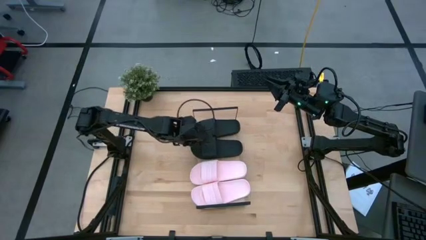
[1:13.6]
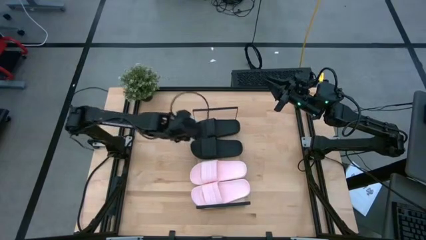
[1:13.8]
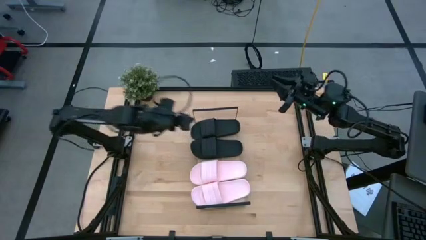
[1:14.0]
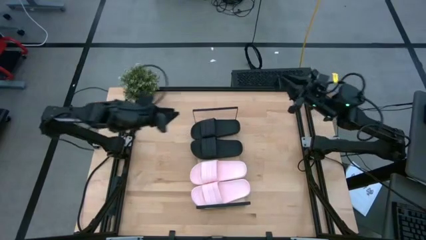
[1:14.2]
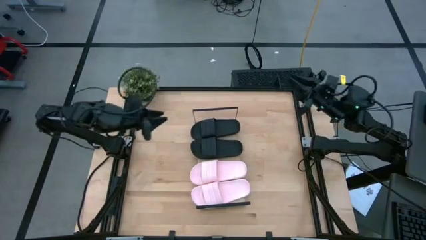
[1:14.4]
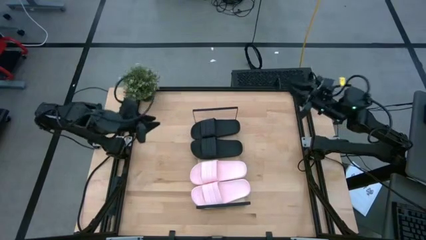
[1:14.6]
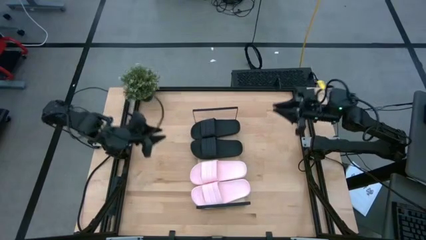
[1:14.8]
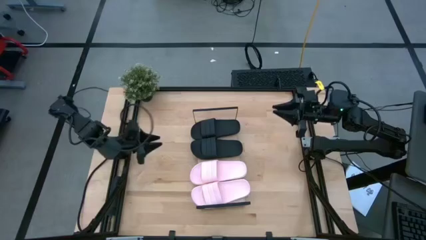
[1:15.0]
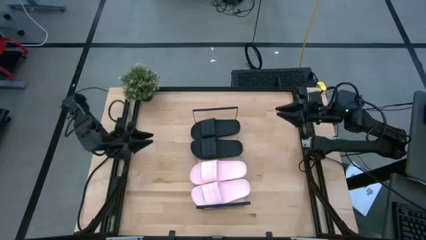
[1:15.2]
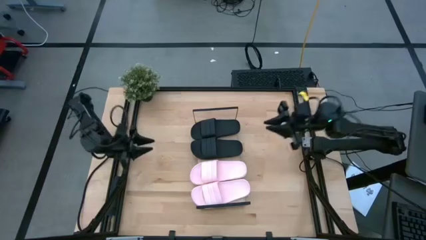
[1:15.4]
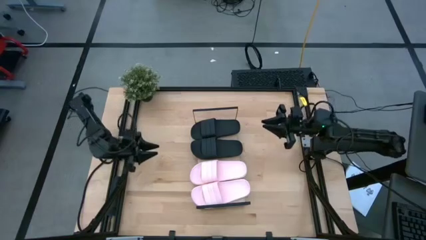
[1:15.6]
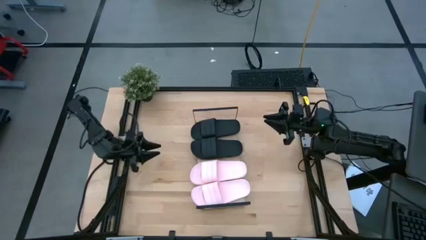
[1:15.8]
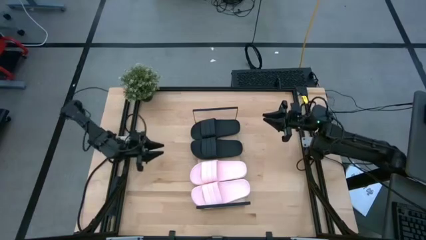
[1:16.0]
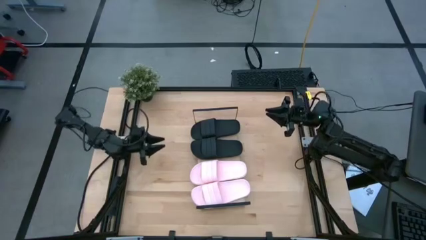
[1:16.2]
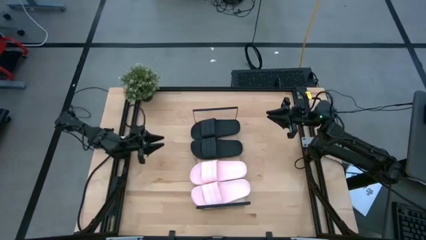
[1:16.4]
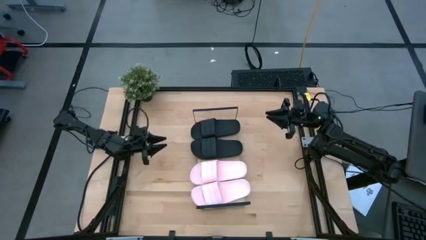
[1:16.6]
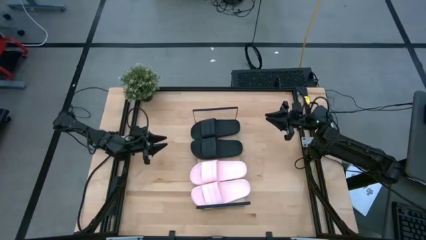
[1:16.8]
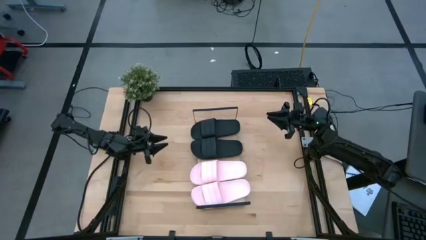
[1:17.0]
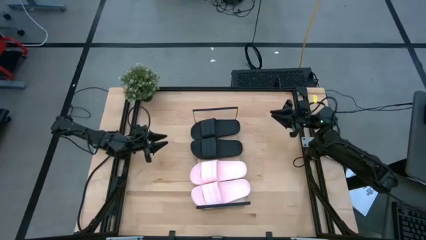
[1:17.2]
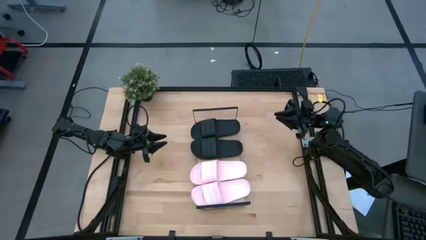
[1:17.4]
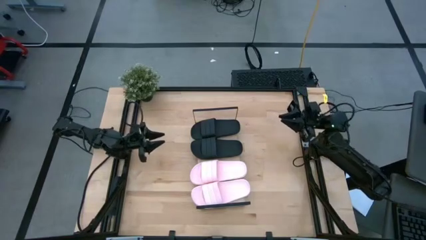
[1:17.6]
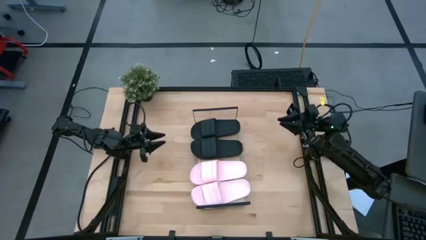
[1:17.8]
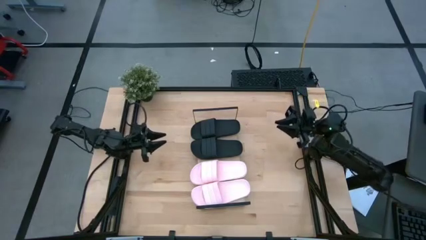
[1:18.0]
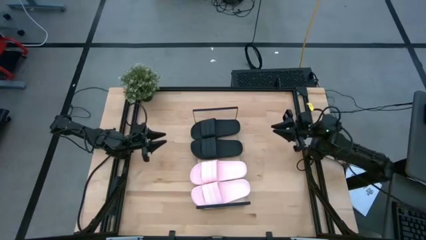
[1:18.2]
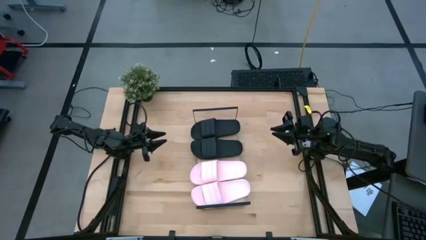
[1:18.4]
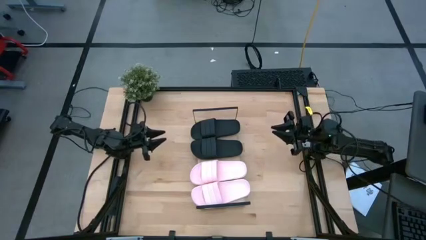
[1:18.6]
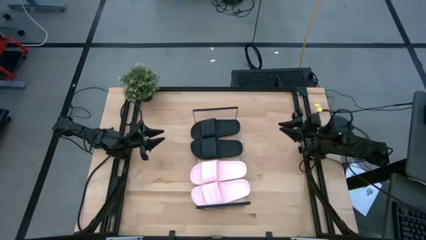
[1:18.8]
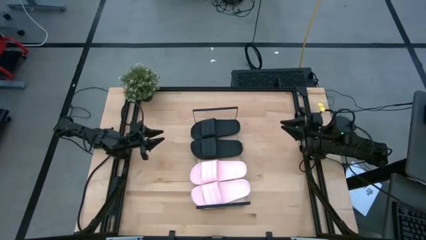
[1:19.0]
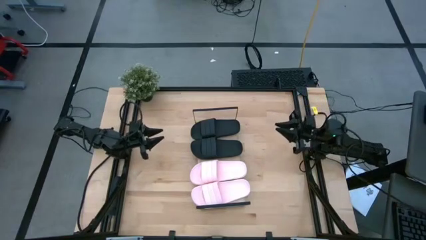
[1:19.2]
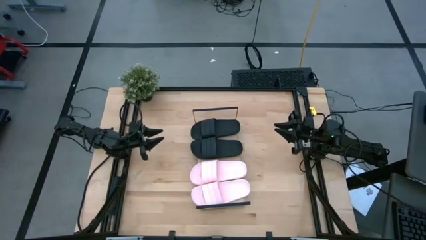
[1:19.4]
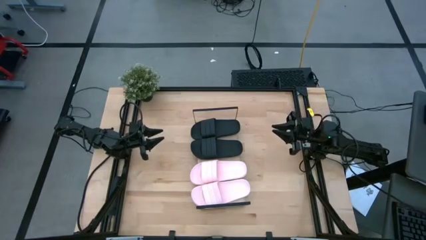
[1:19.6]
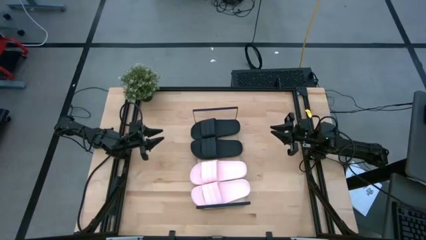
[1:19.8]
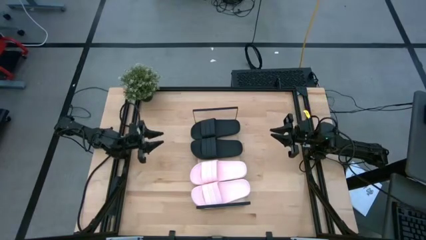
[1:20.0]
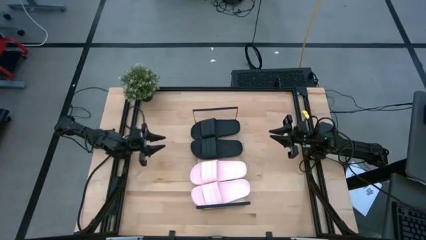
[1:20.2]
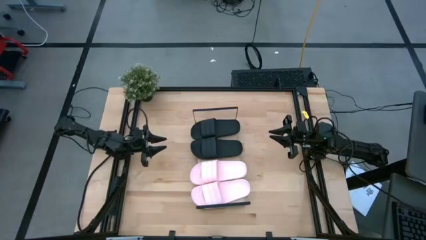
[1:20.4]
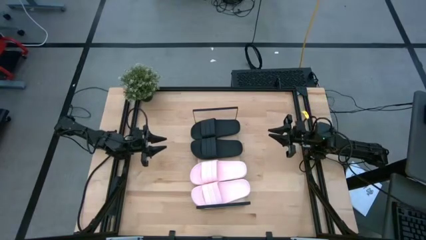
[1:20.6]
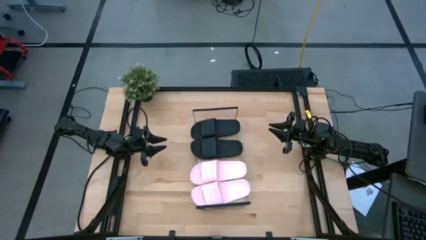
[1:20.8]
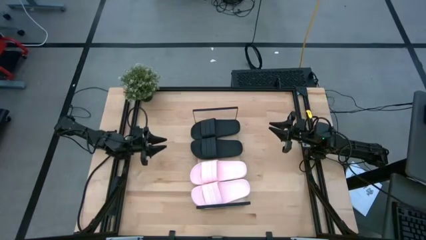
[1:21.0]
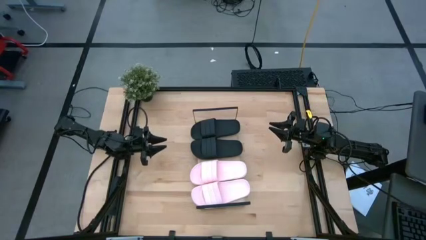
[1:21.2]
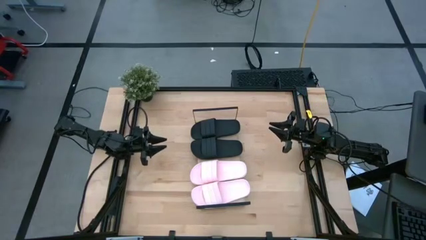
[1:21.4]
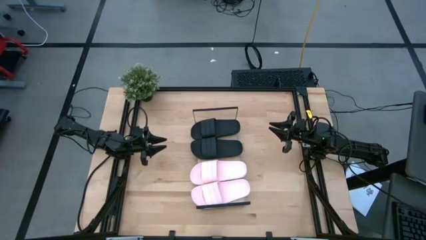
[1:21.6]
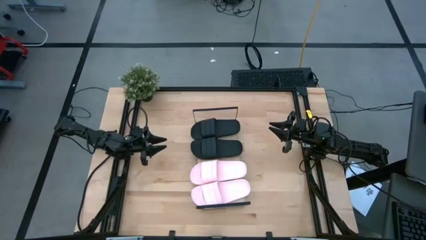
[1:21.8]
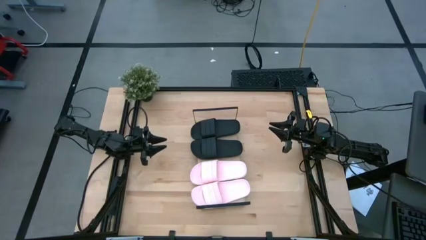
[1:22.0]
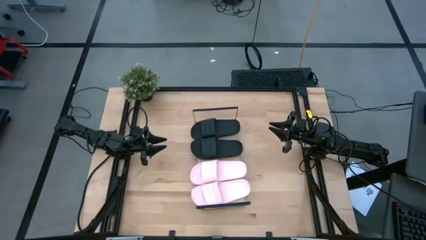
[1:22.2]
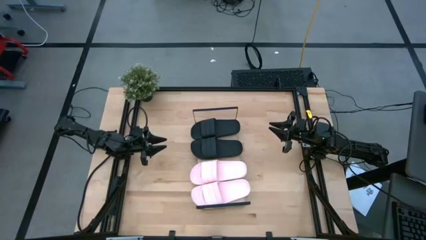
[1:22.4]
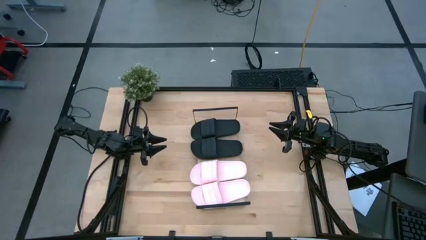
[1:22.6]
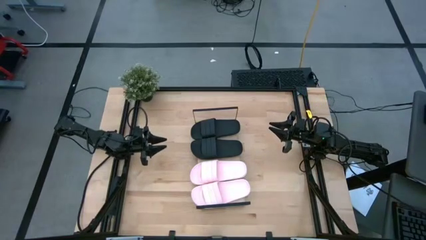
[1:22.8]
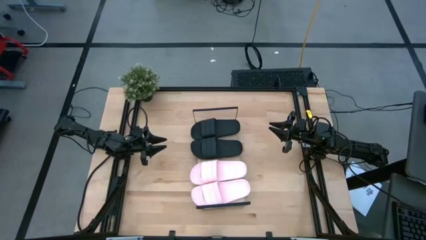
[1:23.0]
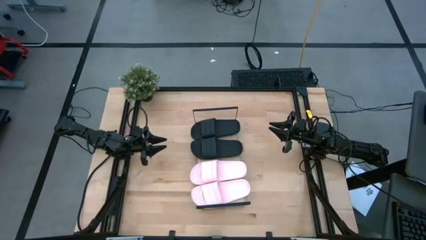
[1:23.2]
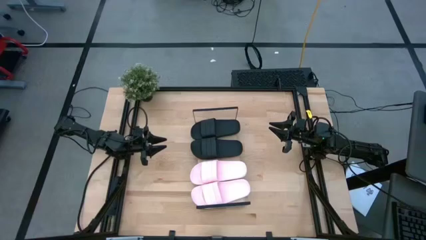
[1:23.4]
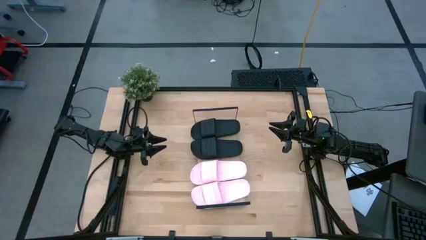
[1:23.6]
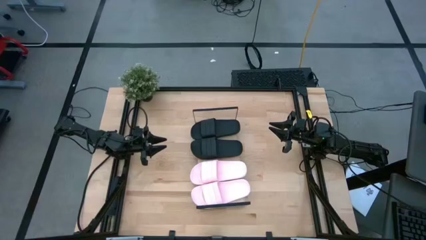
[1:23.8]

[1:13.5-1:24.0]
Task: Pick and place slides into the shelf
Return to Home Position
